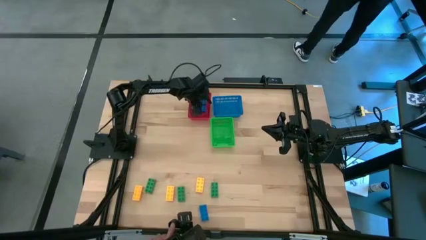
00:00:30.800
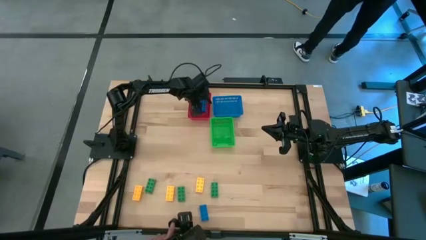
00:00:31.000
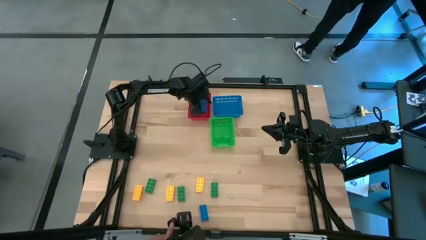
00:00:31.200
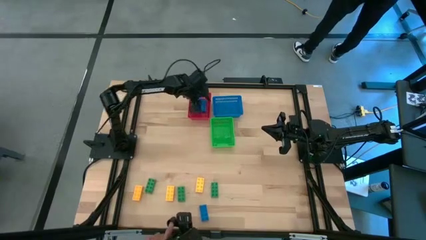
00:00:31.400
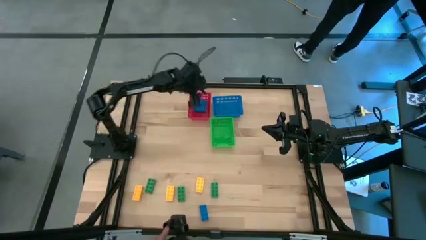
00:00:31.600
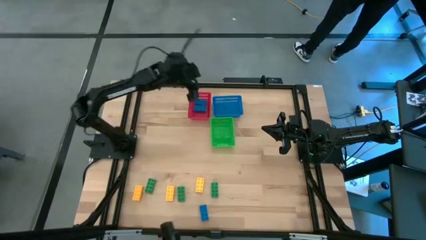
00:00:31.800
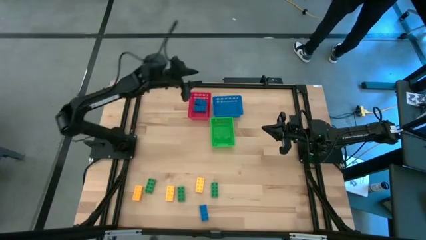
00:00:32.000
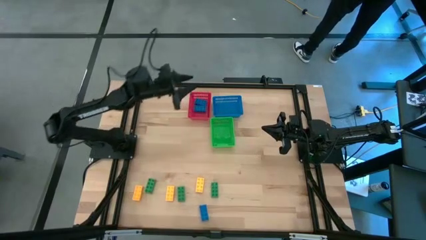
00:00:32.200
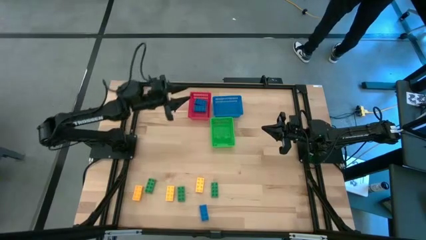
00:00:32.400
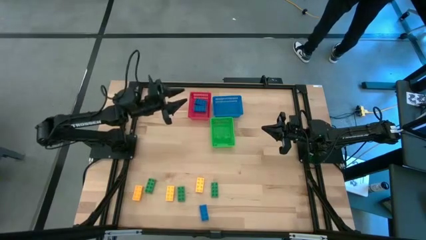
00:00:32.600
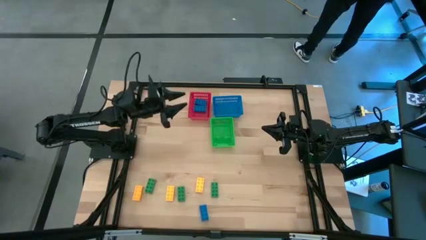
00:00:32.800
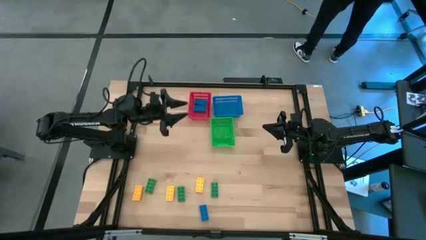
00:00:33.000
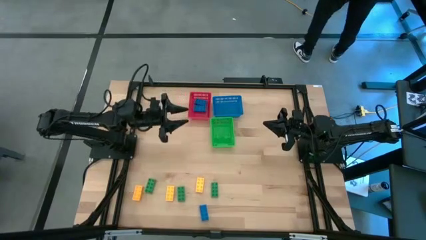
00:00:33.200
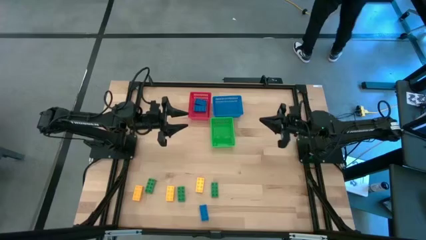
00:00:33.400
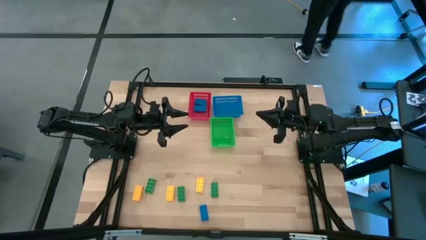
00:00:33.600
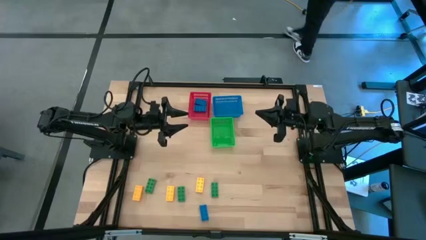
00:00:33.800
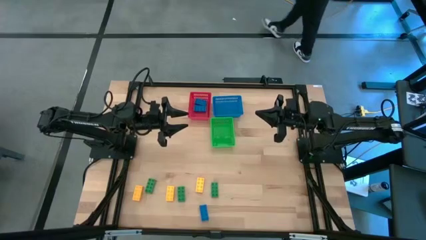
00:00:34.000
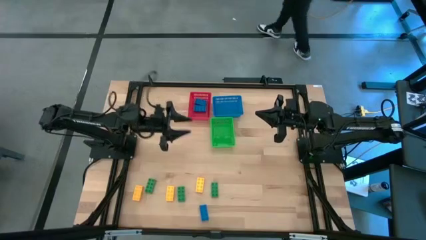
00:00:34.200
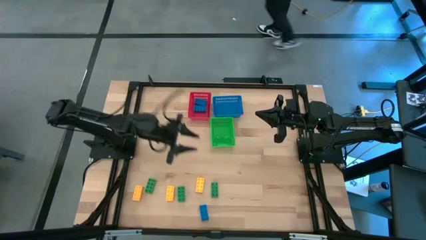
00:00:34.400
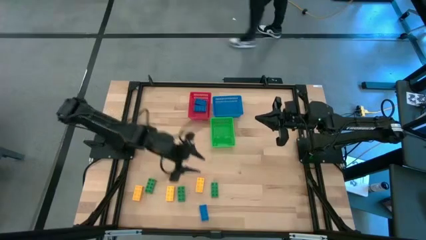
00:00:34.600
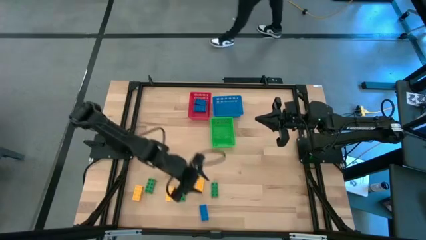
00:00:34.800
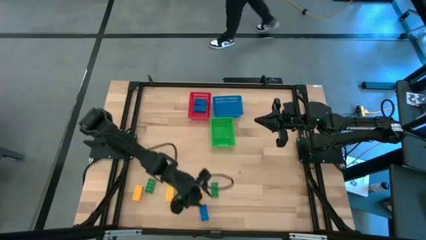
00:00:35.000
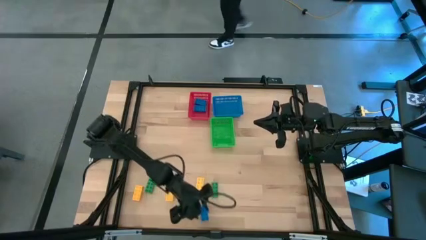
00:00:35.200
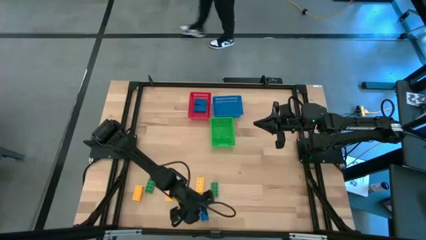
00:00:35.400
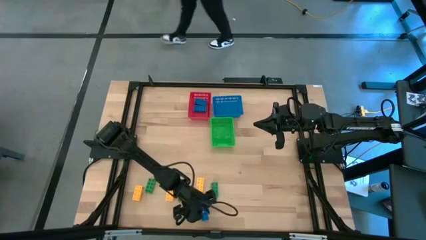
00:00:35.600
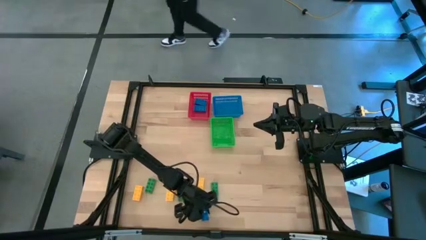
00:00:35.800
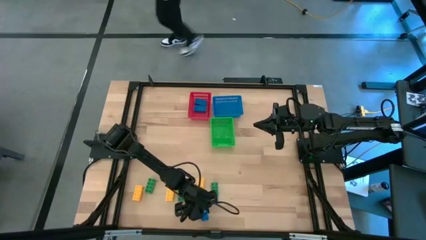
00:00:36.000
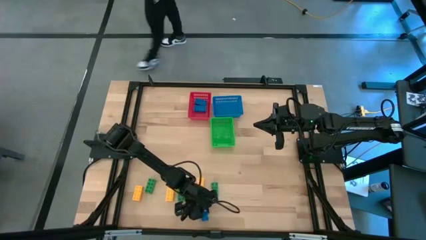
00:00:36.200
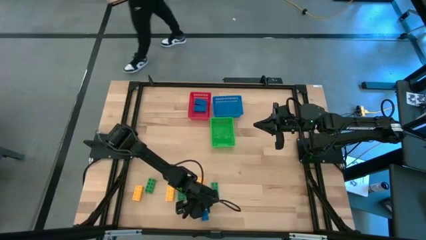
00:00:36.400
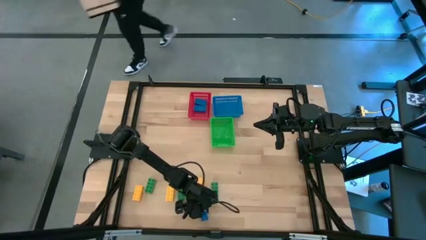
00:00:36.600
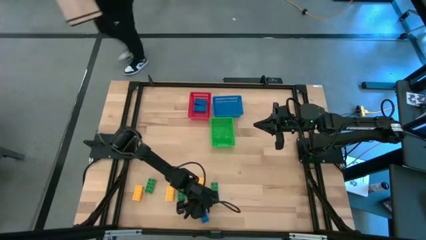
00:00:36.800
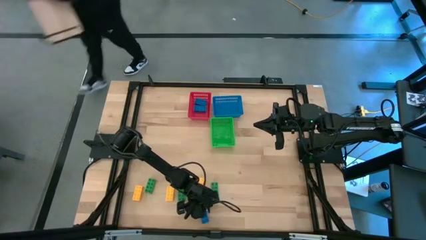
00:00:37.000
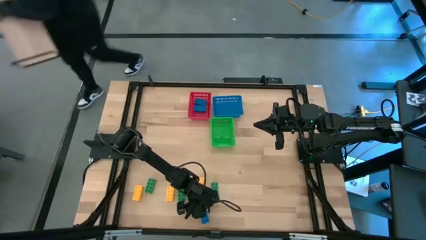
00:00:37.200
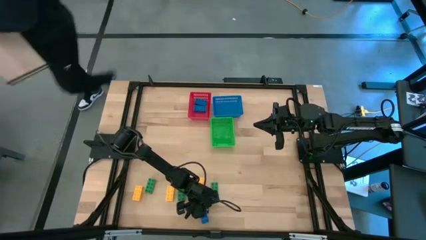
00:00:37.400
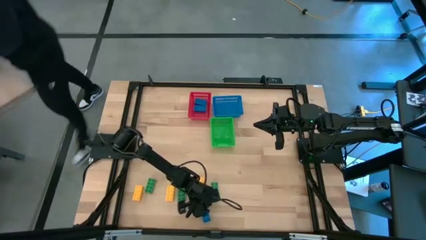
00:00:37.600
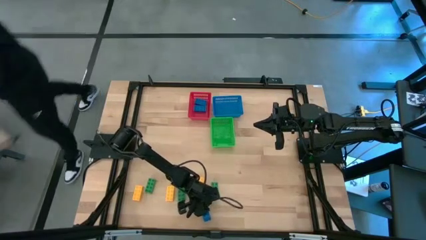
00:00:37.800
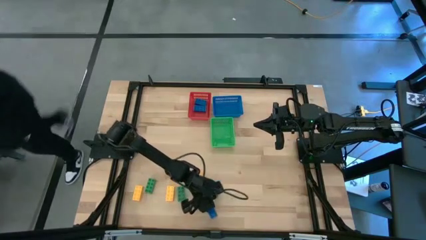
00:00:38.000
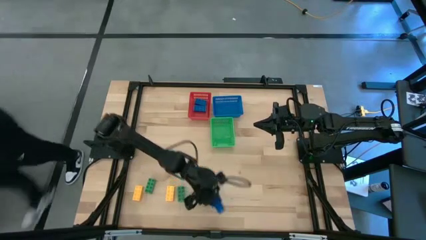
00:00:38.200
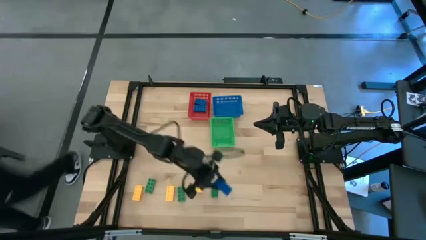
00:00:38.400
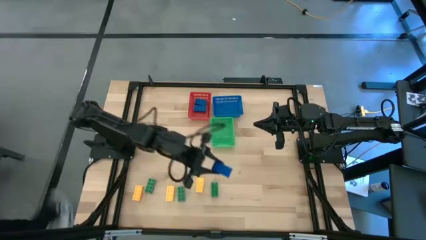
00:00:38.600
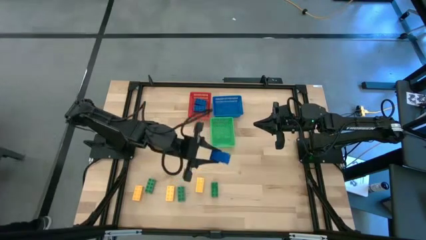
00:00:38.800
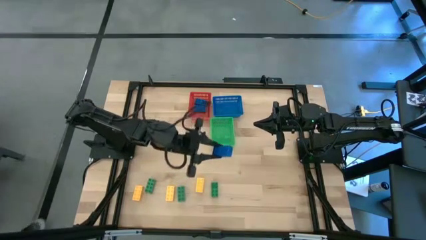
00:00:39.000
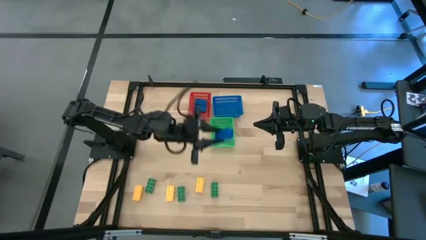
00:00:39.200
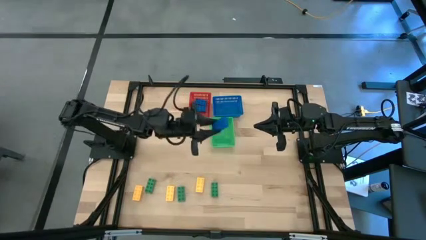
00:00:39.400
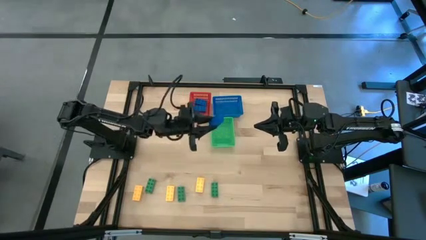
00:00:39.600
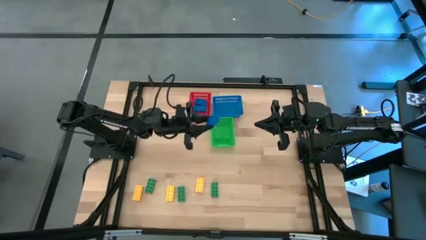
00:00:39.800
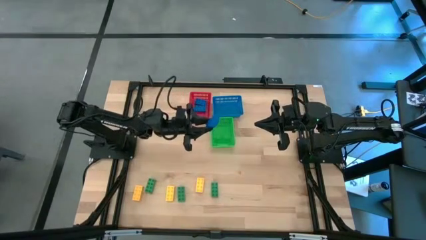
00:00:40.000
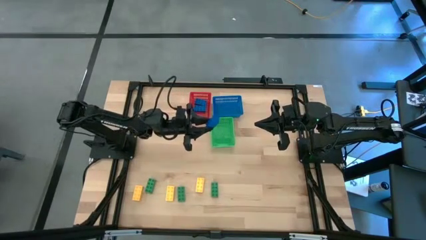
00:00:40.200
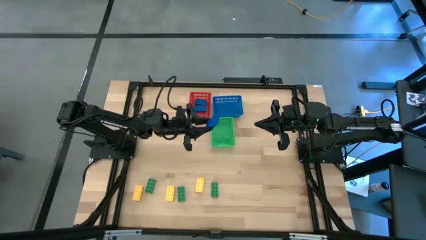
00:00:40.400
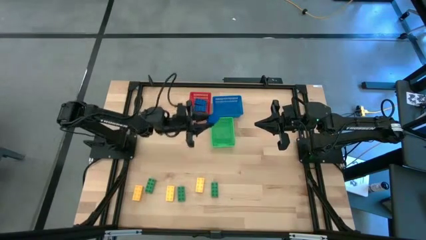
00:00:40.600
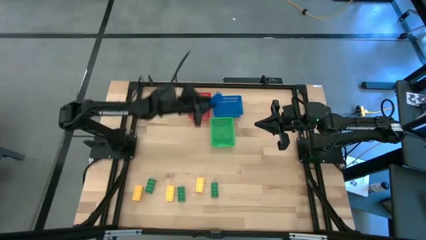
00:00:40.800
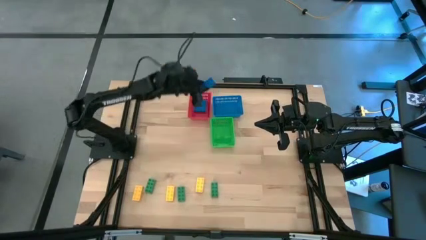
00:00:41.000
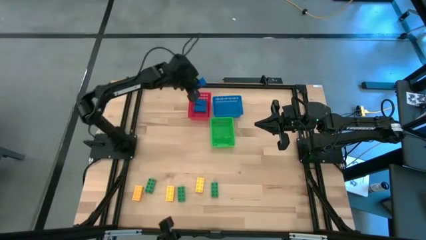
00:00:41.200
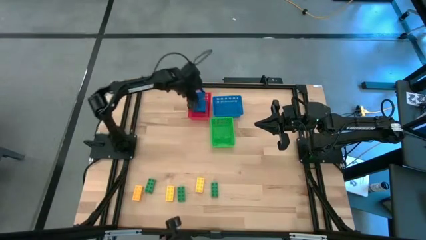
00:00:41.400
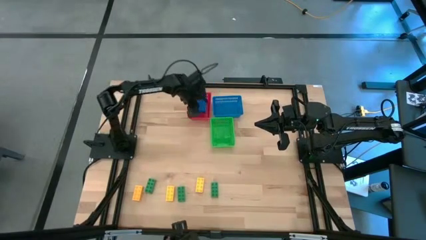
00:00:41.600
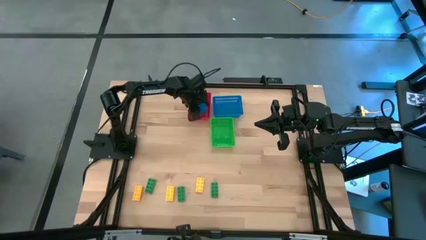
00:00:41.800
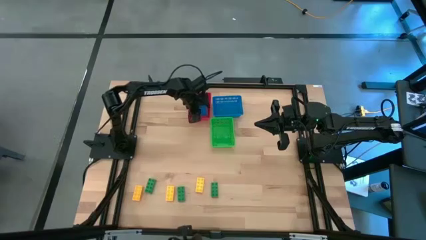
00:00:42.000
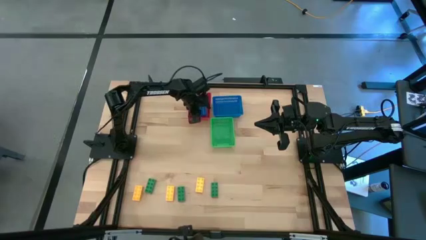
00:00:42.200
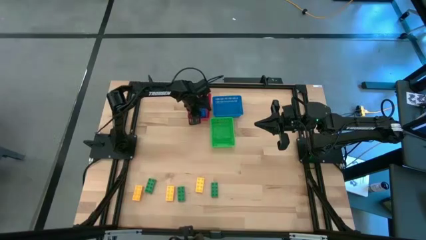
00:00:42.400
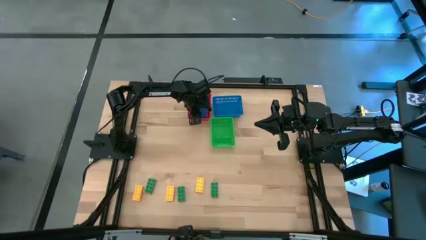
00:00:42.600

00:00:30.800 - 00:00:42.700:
Task: Sort & place blocks by color
Put the blue game piece into the red bin
